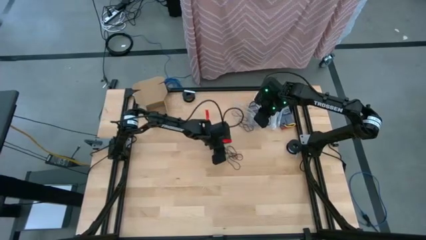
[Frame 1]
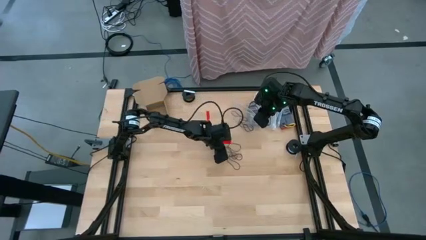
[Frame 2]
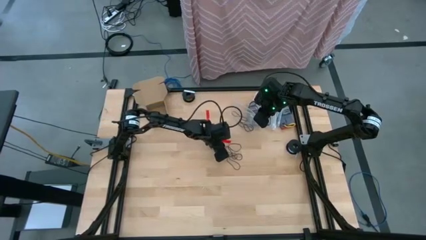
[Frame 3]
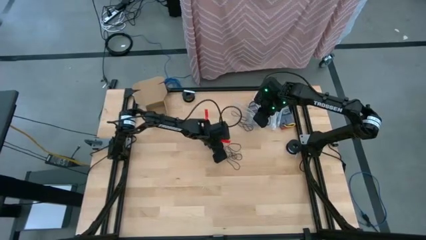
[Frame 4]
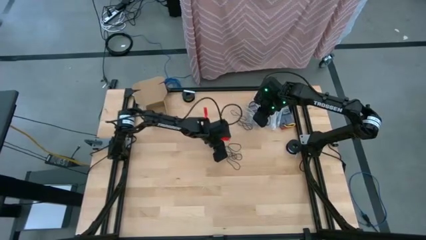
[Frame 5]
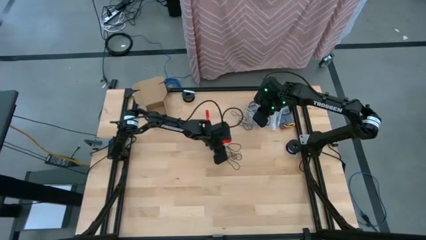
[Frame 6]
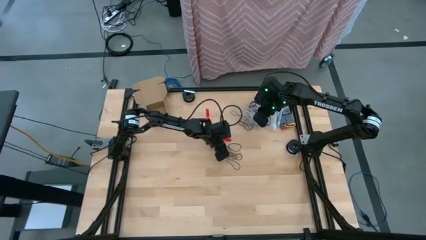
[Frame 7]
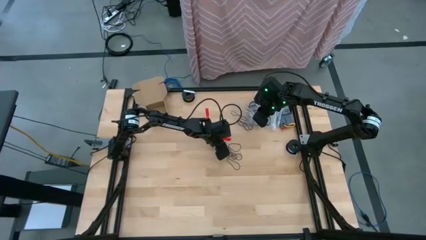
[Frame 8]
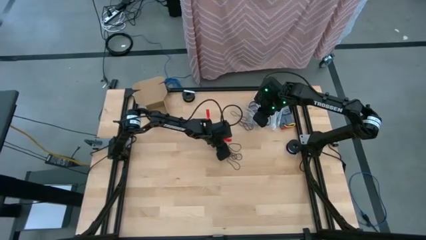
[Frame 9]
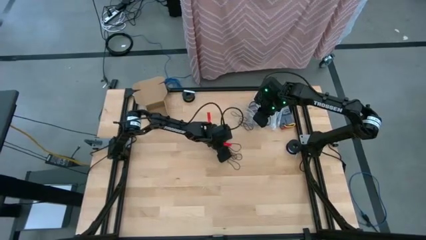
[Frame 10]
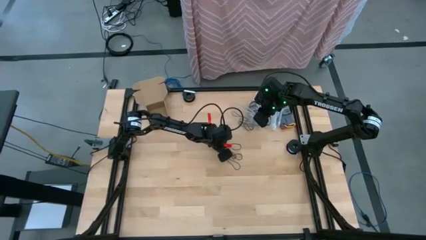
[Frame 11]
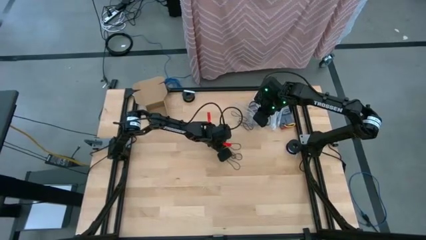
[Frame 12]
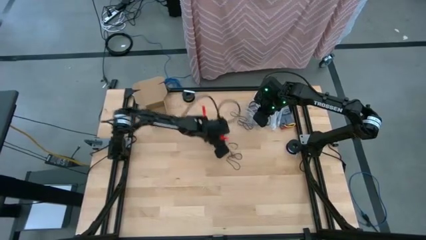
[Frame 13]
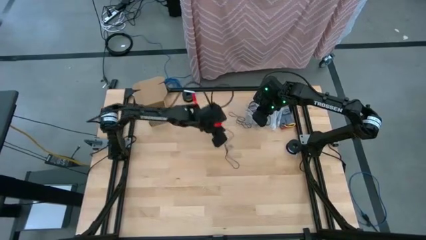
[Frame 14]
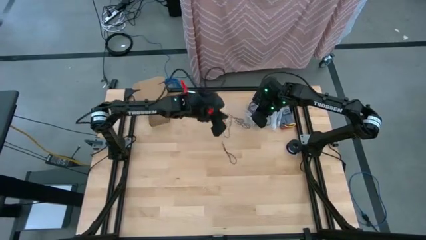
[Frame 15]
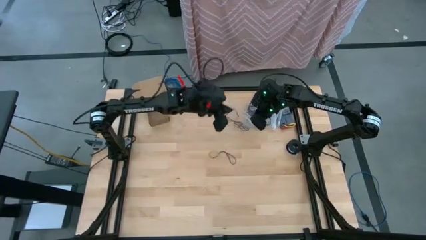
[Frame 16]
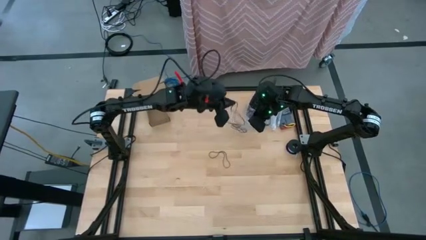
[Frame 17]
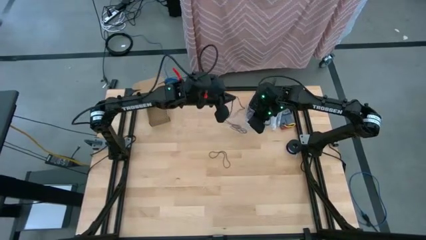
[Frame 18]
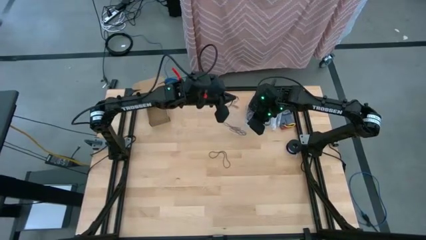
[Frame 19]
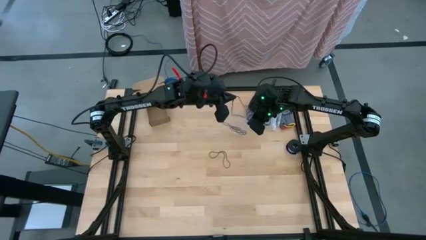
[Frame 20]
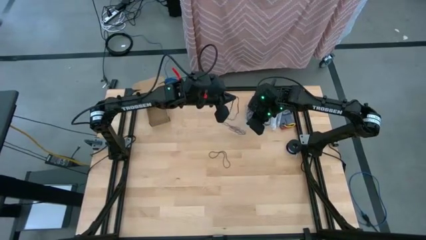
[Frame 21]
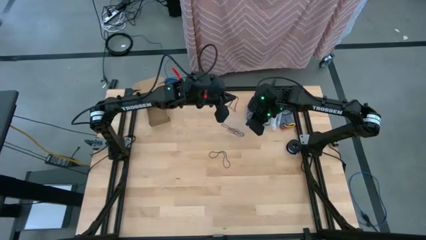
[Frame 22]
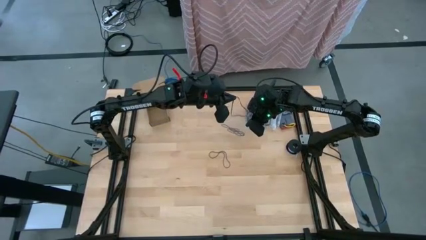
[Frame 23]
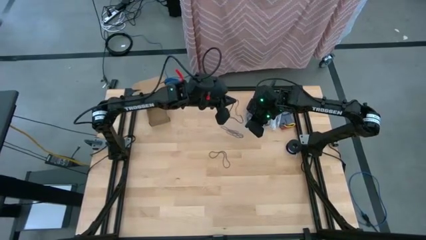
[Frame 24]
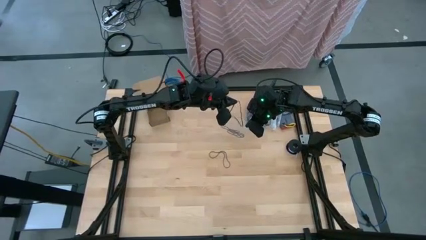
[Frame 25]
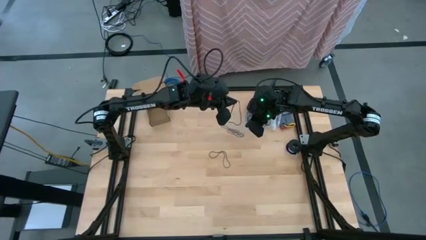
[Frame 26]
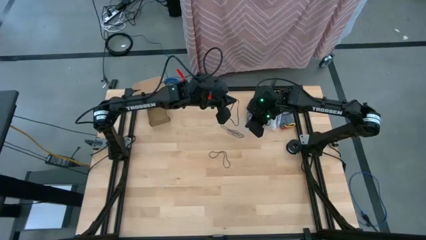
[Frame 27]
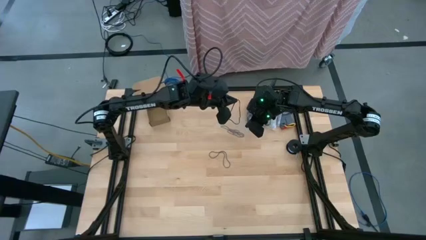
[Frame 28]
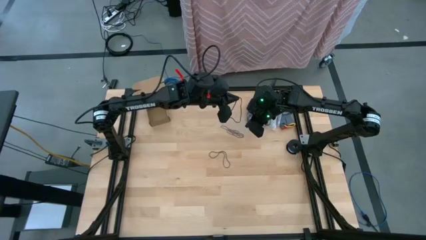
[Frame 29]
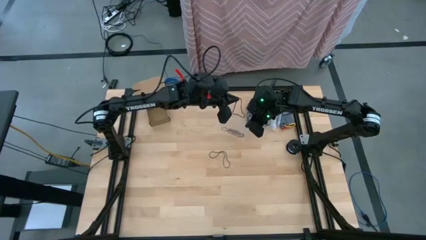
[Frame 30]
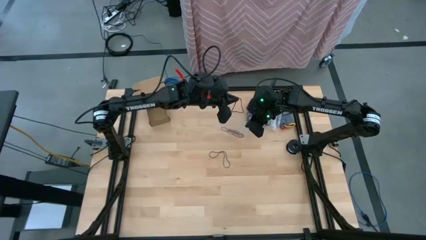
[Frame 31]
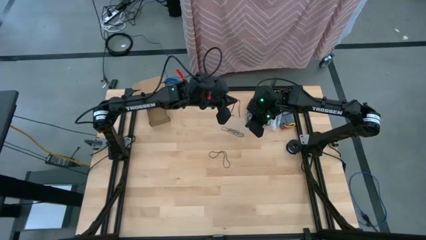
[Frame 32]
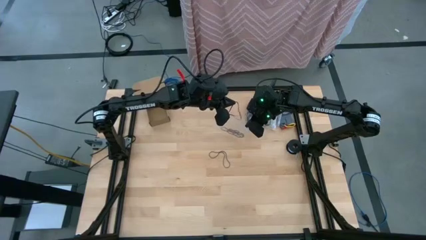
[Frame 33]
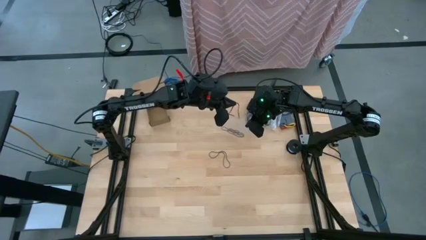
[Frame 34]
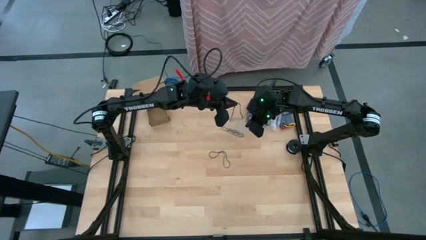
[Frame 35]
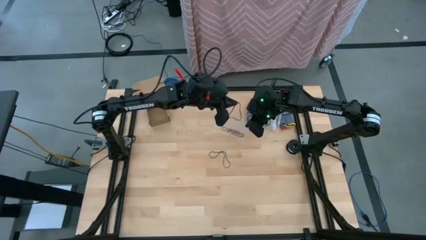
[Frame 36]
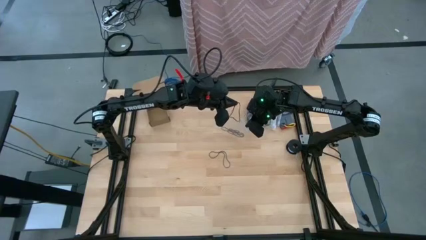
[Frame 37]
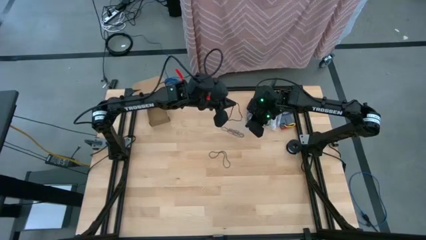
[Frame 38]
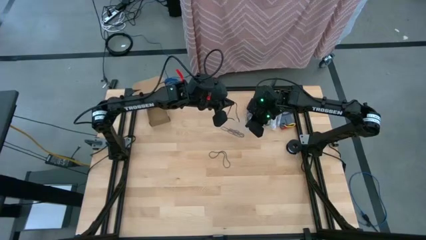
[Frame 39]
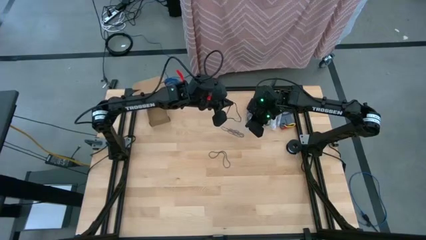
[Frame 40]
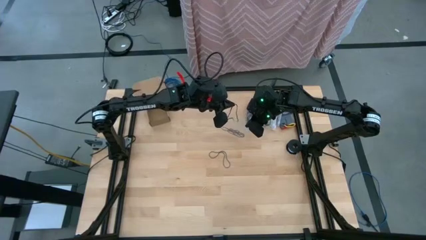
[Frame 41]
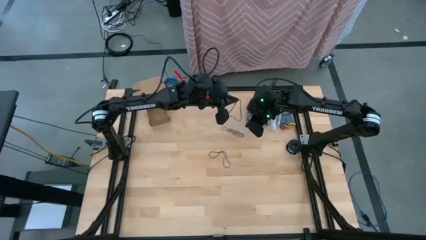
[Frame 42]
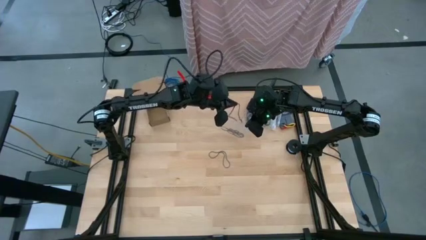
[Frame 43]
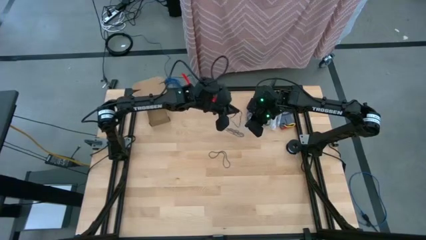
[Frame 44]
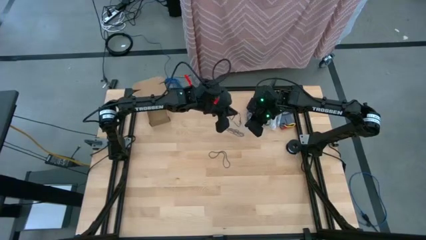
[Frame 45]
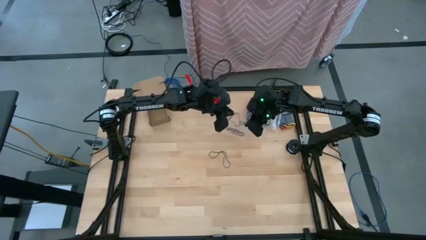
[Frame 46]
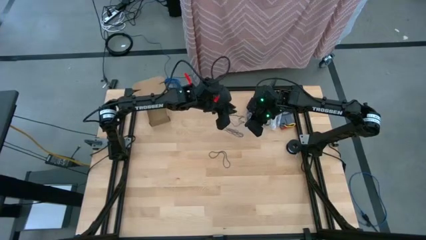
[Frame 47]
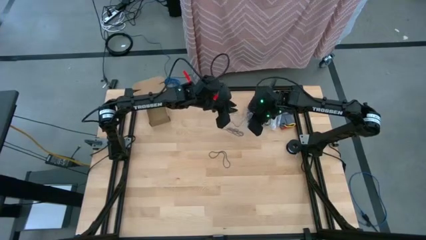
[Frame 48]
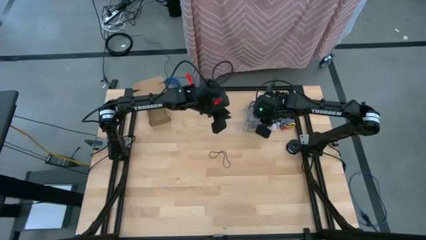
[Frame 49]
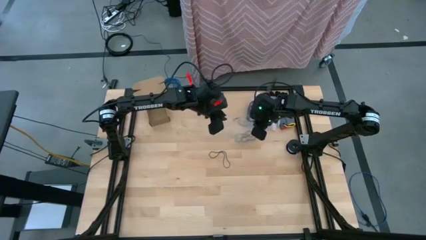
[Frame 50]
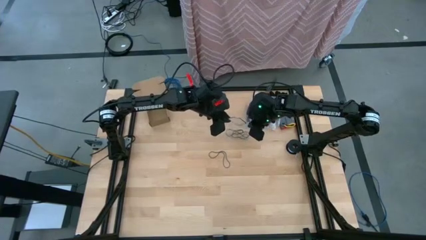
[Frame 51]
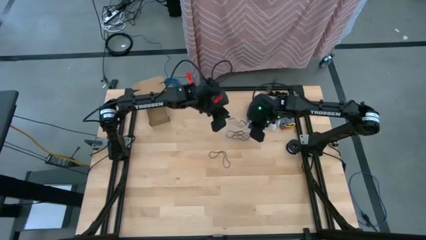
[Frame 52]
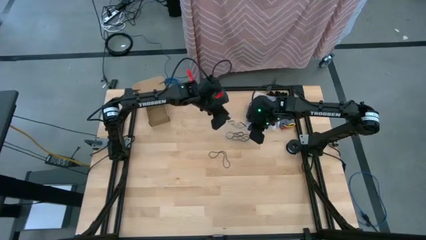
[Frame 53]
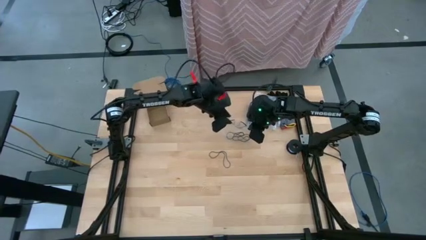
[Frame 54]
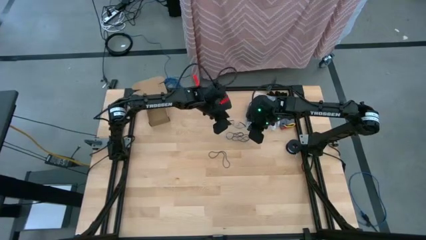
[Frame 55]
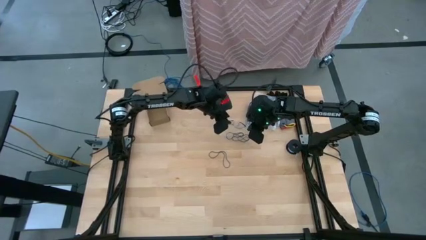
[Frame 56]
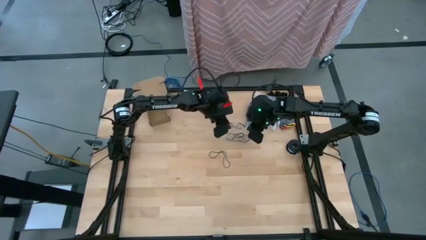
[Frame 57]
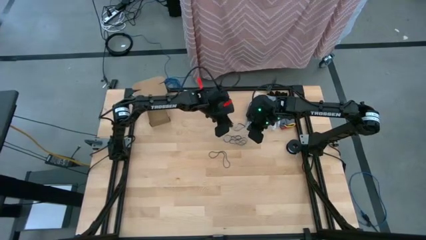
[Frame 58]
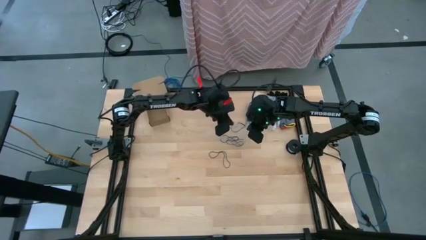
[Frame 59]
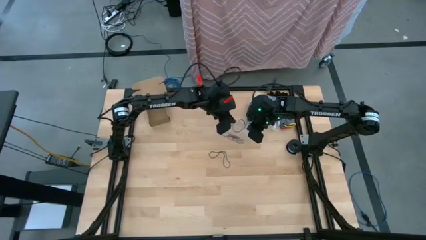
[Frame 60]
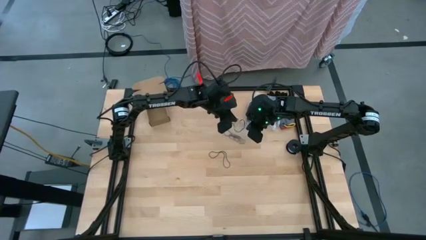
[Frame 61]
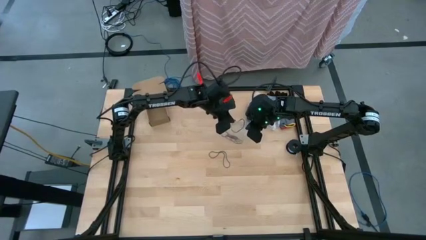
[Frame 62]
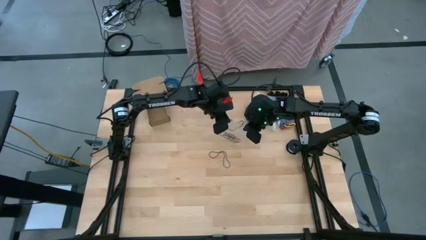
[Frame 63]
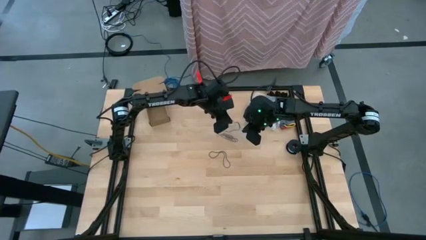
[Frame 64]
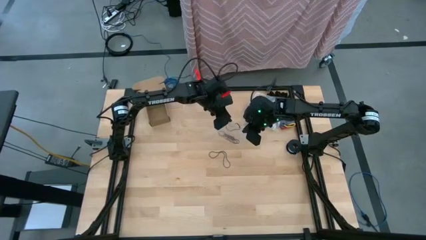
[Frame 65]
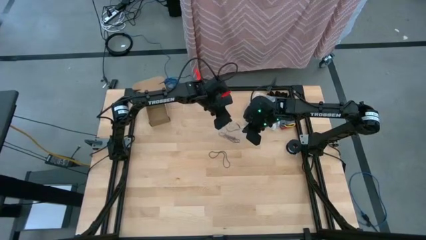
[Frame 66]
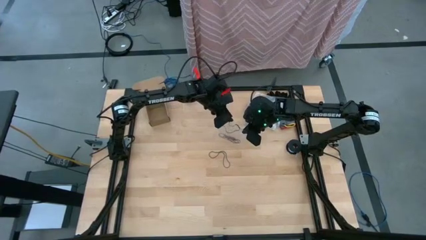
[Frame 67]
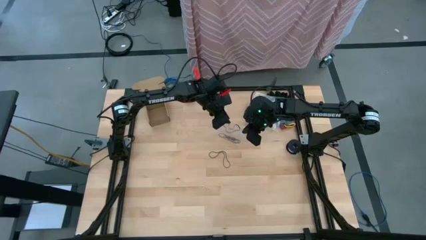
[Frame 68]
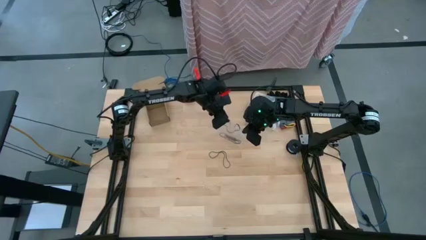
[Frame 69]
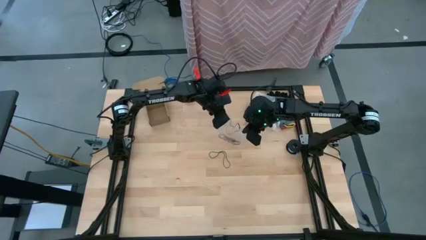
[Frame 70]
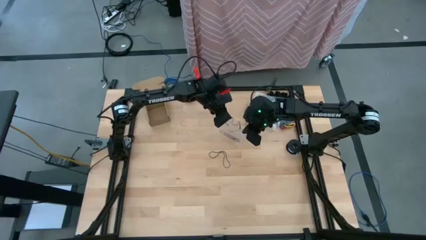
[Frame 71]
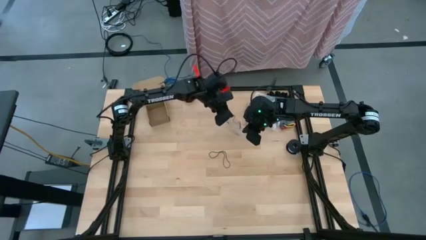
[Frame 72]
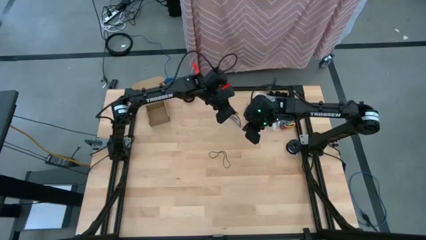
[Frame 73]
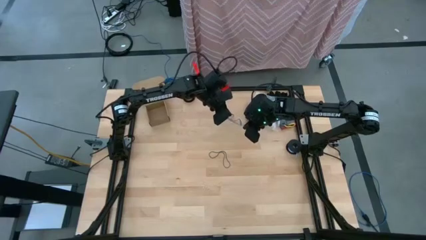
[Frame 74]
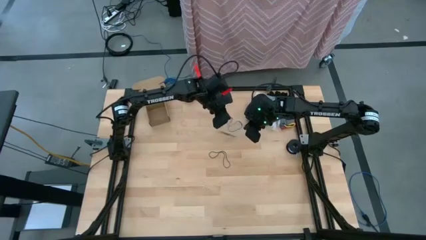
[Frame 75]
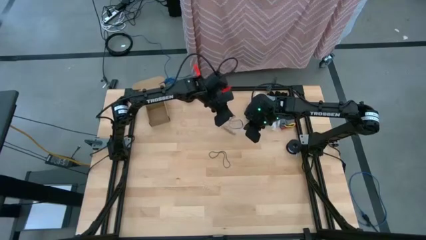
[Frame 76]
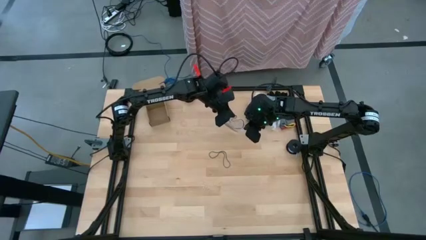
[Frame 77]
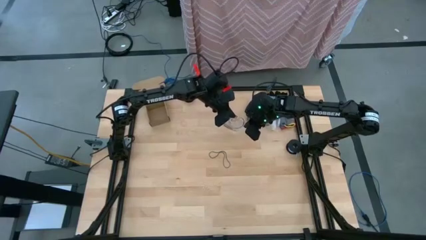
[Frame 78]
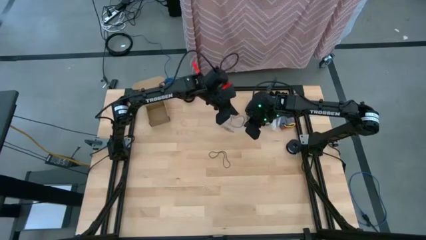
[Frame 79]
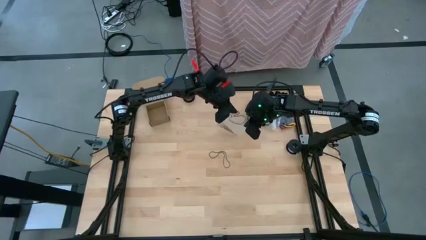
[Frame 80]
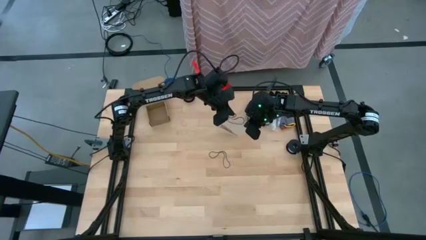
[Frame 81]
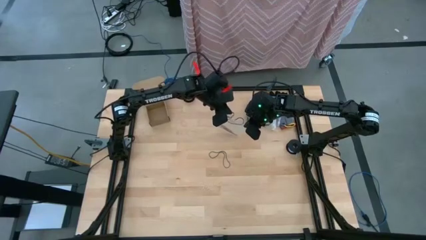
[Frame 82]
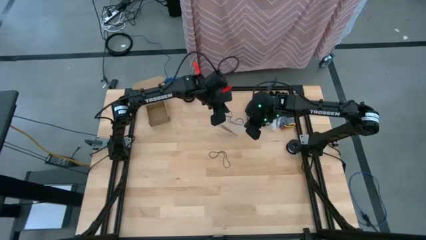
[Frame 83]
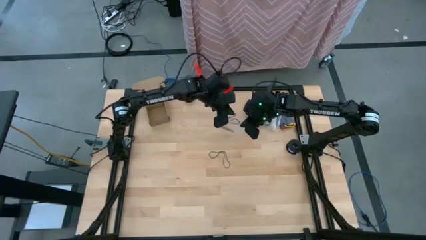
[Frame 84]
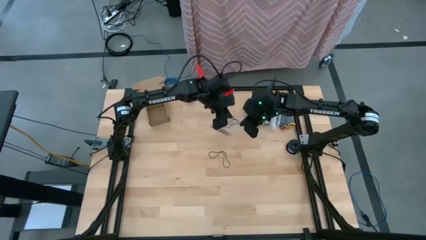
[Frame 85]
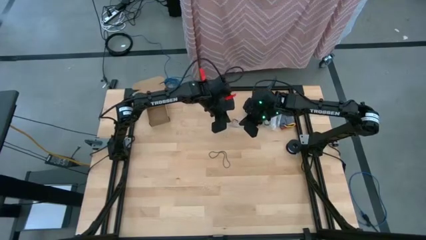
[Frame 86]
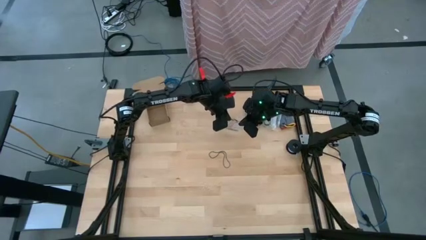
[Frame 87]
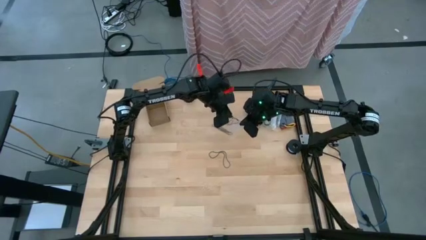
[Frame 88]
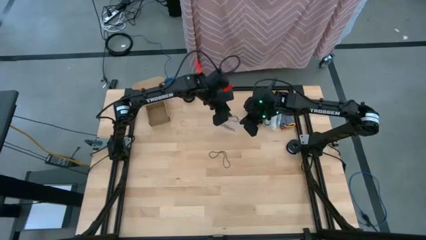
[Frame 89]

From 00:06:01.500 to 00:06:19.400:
Task: Sort rubber bands
Put the black rubber band into the transparent zip bag
